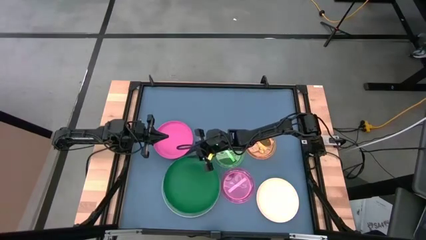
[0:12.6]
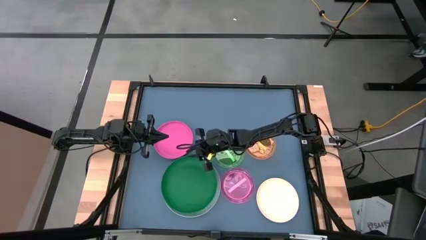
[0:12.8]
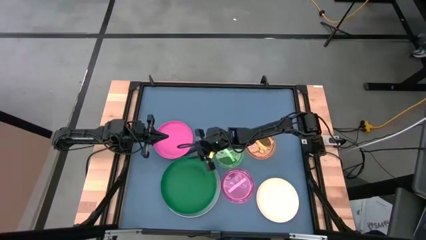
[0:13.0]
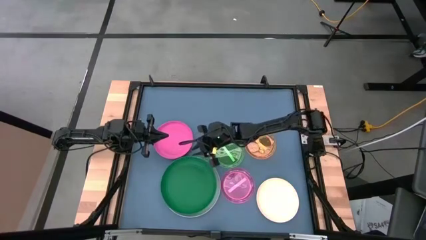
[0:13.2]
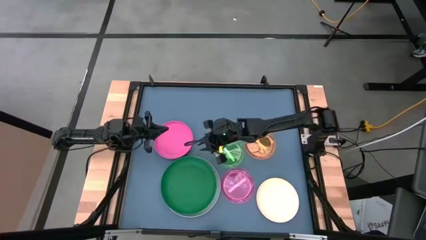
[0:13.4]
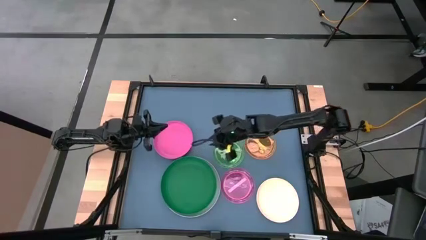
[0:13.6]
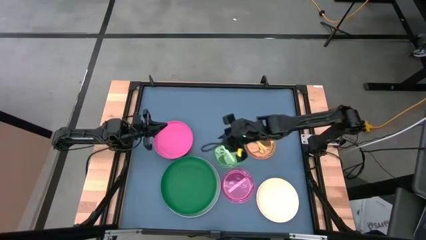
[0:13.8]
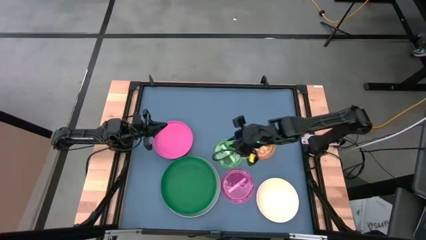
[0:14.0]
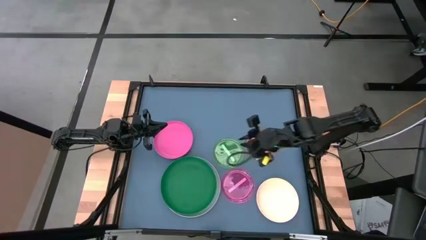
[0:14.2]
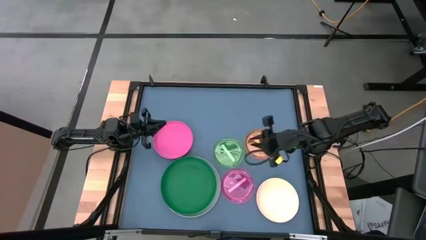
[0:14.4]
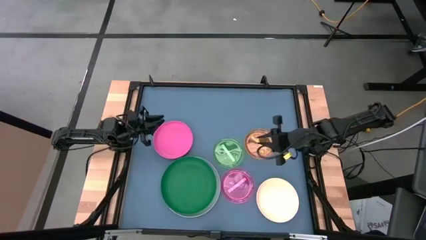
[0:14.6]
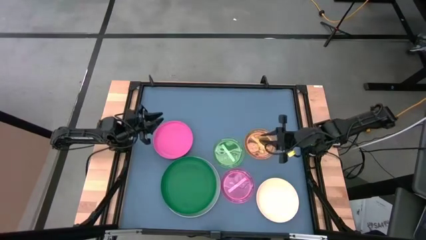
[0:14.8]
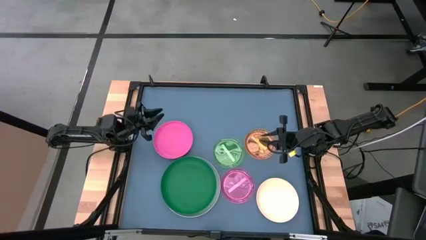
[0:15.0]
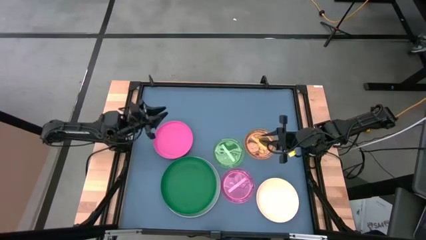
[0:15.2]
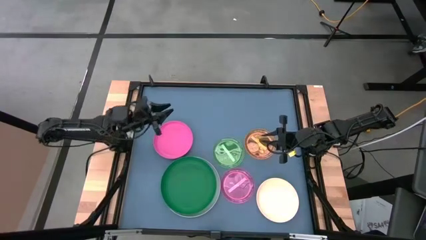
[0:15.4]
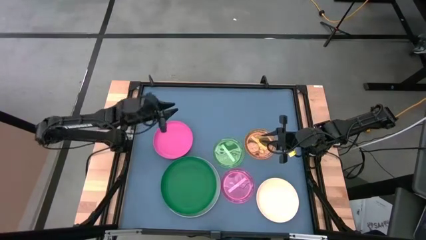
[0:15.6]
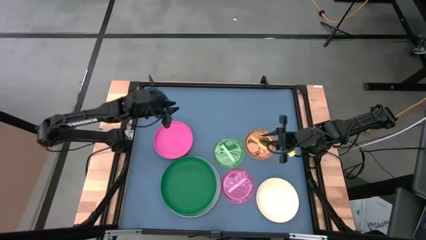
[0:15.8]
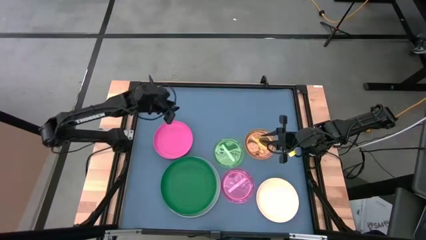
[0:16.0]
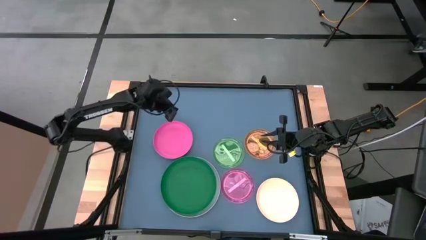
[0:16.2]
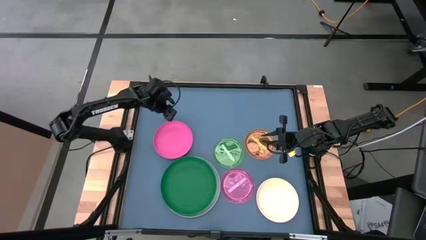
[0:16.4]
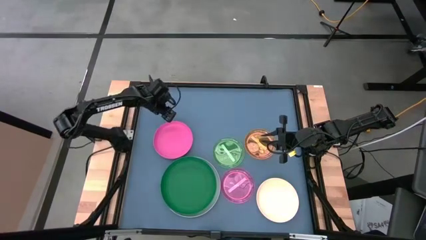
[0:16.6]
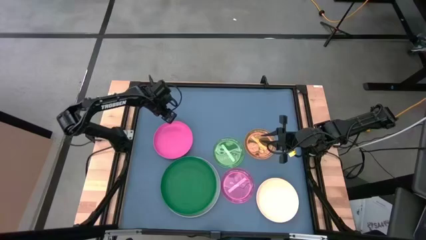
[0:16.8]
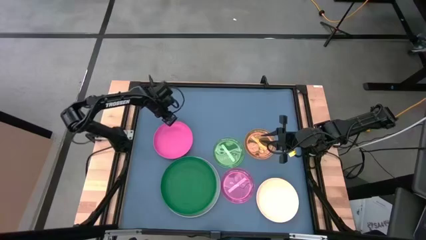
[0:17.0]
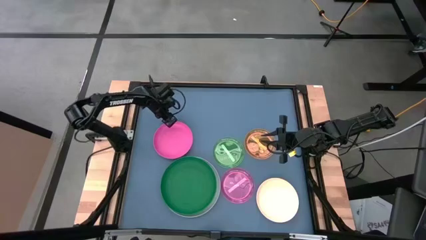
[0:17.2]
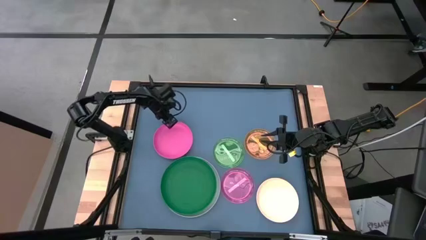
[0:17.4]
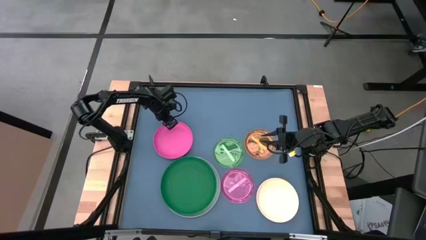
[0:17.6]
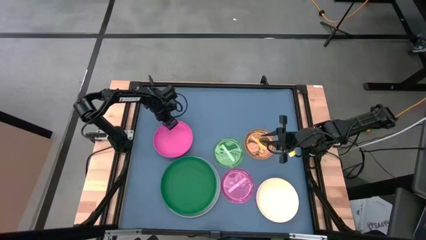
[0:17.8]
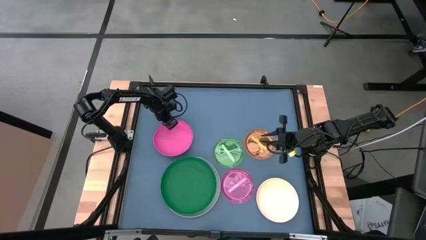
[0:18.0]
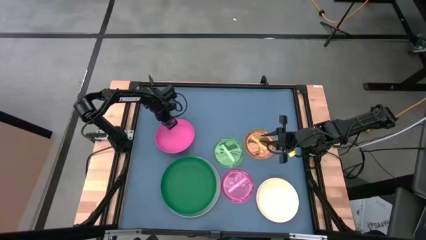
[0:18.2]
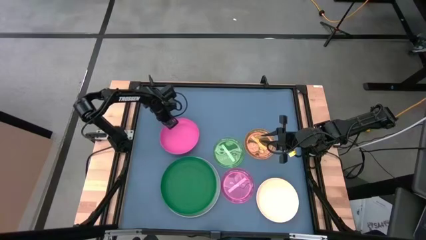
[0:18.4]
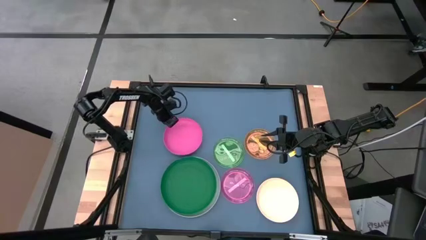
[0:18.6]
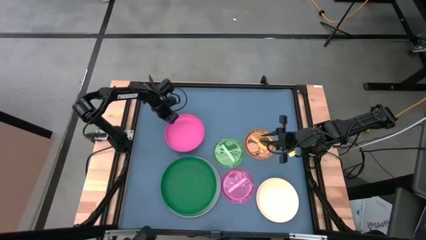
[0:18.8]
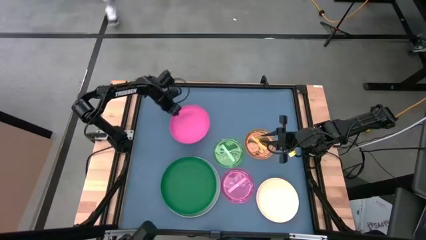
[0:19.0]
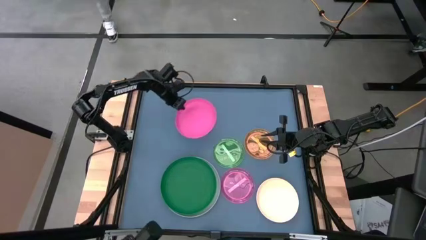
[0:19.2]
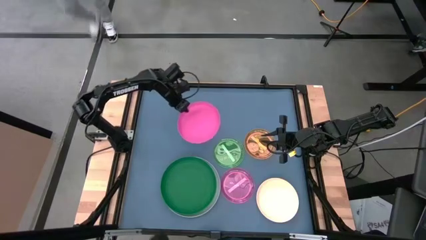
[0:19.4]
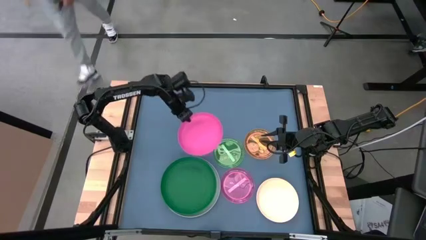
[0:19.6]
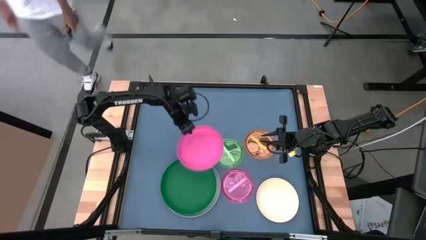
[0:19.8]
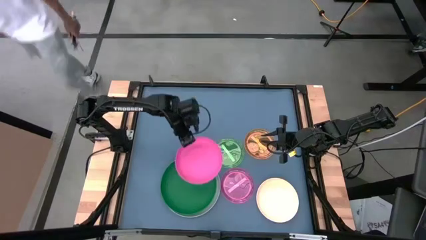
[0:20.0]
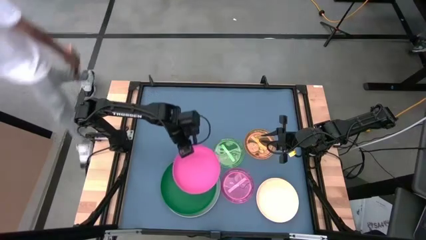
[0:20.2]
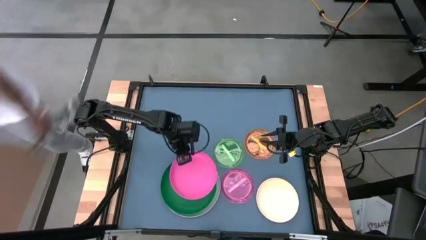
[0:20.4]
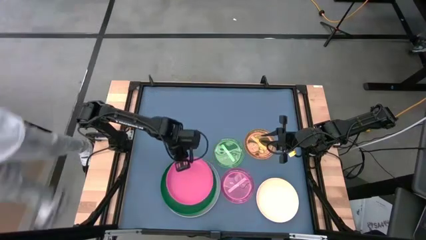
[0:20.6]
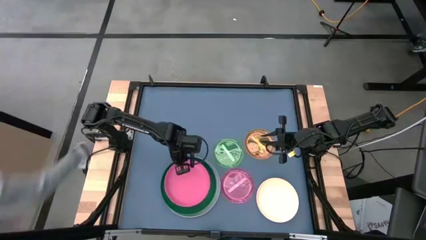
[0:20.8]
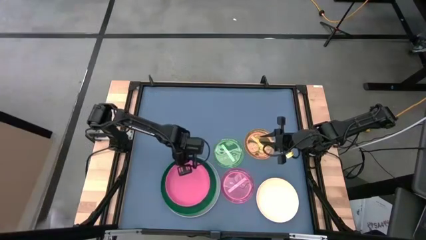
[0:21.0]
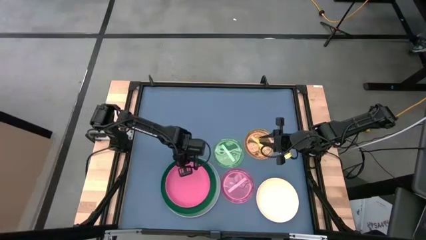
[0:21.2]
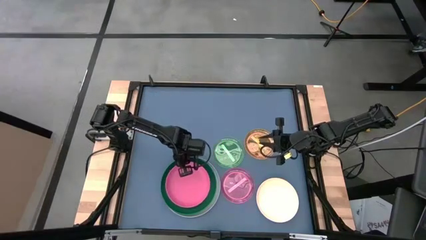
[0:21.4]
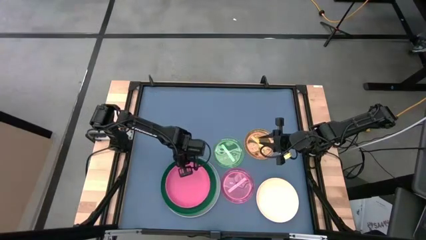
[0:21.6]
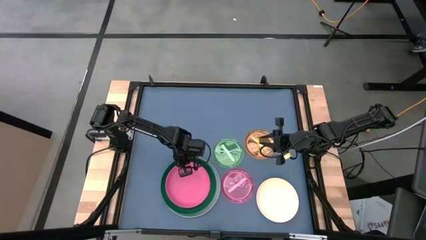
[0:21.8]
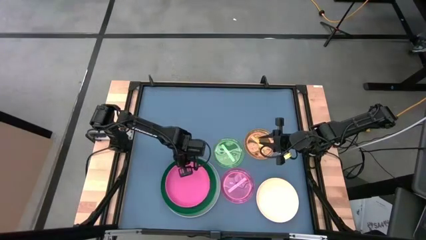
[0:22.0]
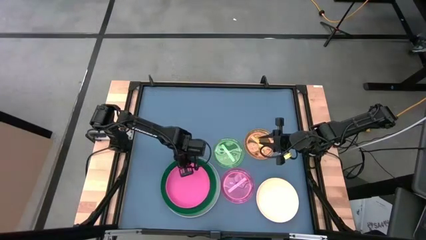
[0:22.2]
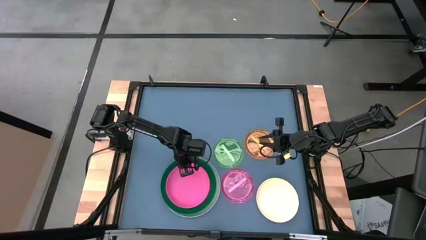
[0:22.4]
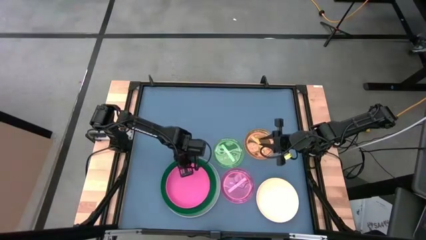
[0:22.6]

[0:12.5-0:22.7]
Task: Stack plastic plates
Stack the pink plate on top of the green plate
